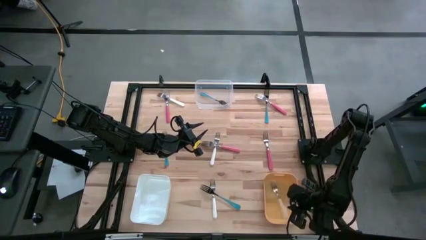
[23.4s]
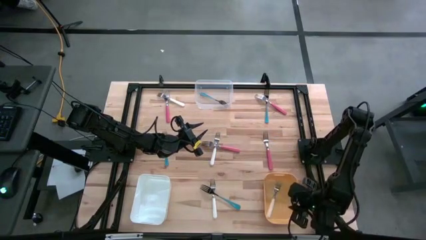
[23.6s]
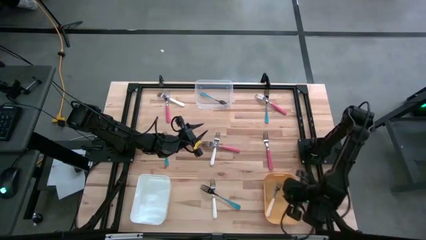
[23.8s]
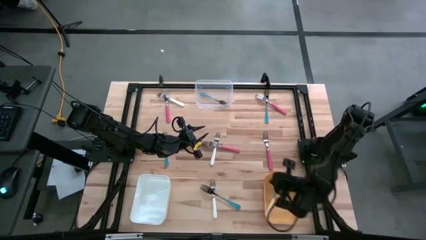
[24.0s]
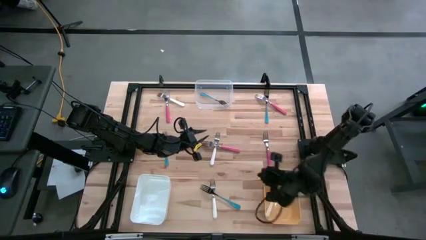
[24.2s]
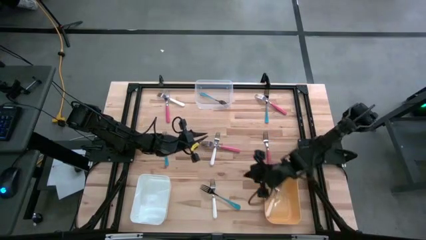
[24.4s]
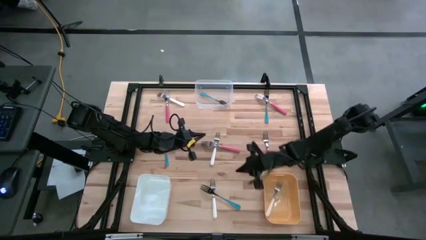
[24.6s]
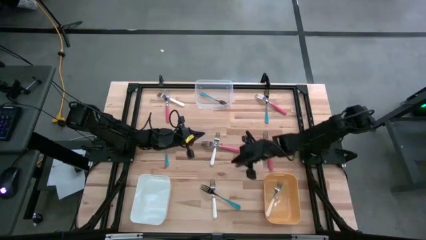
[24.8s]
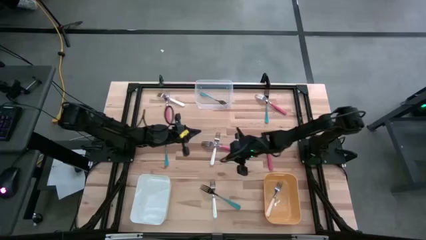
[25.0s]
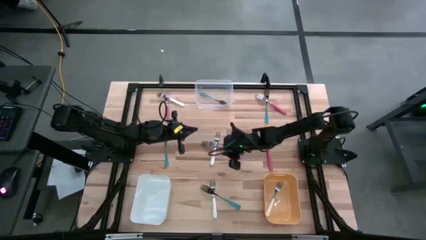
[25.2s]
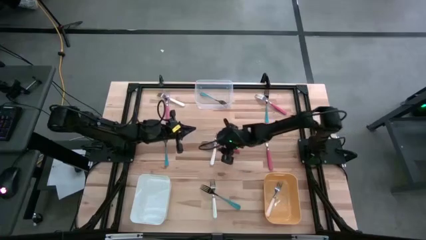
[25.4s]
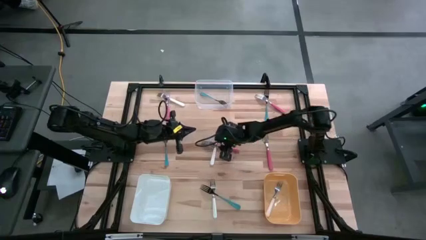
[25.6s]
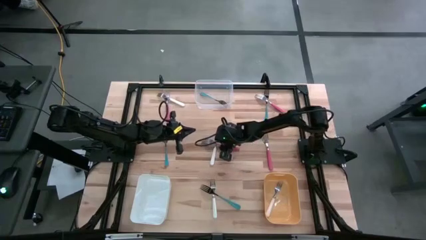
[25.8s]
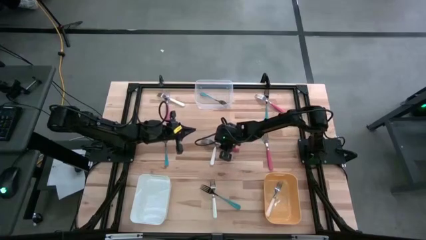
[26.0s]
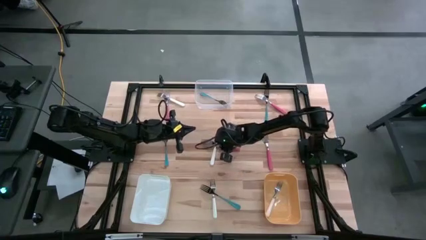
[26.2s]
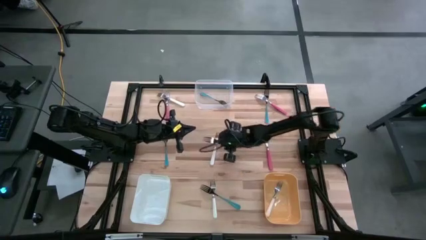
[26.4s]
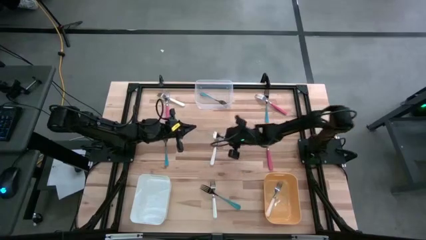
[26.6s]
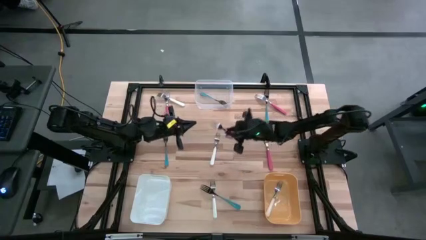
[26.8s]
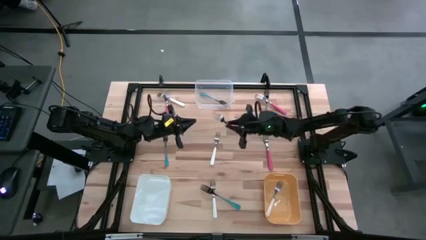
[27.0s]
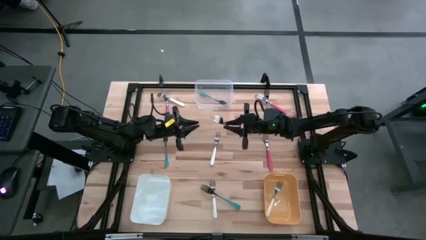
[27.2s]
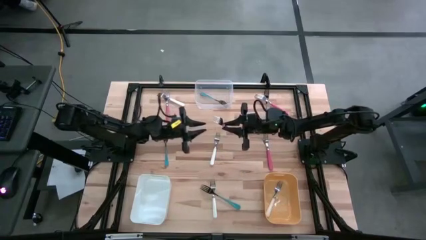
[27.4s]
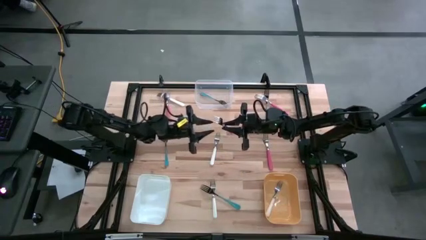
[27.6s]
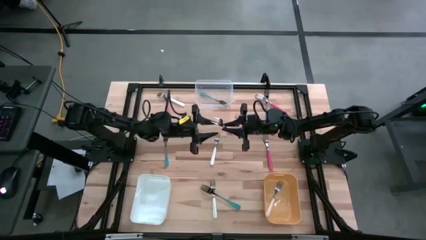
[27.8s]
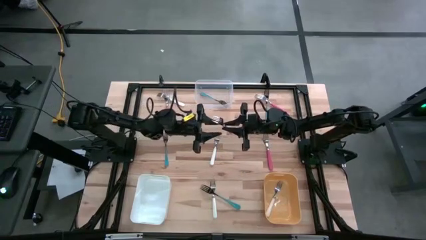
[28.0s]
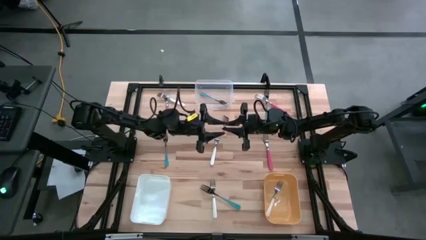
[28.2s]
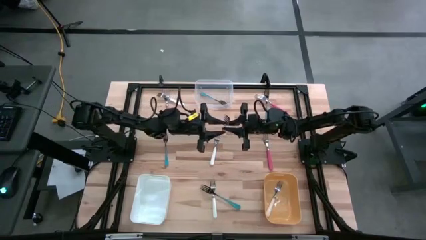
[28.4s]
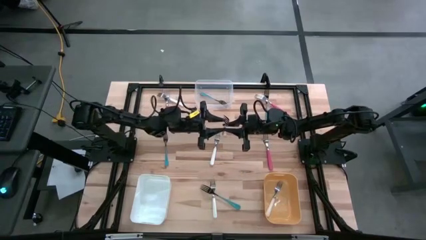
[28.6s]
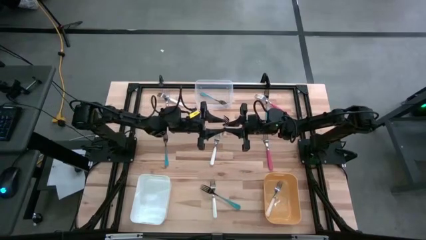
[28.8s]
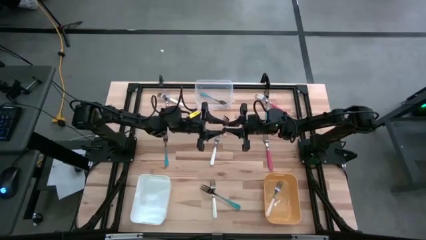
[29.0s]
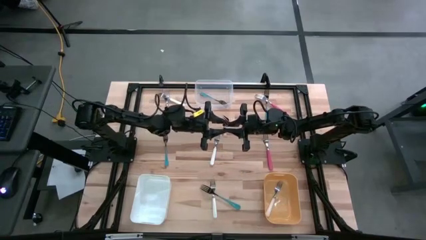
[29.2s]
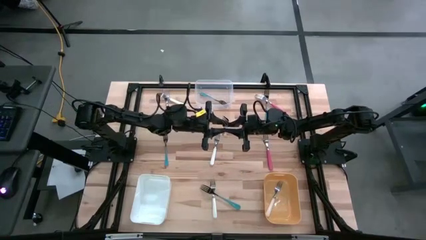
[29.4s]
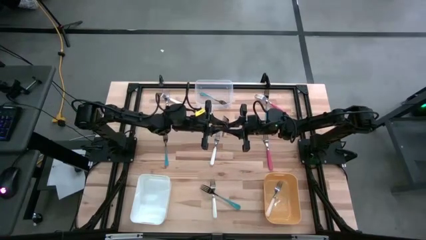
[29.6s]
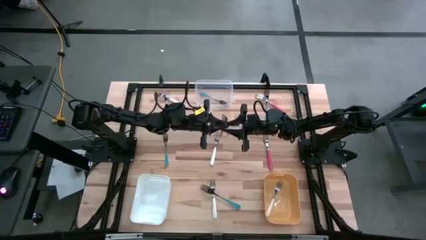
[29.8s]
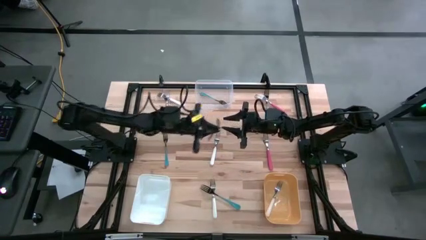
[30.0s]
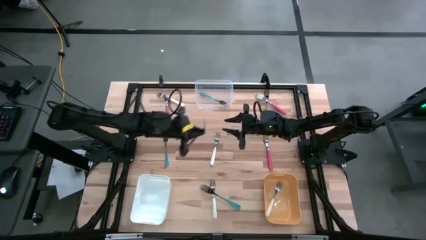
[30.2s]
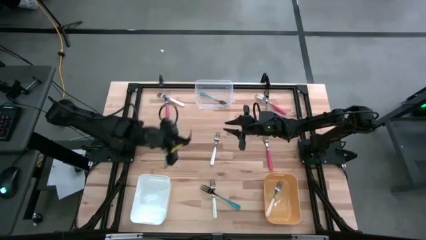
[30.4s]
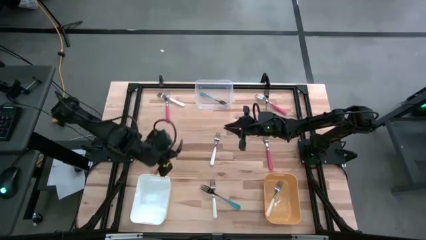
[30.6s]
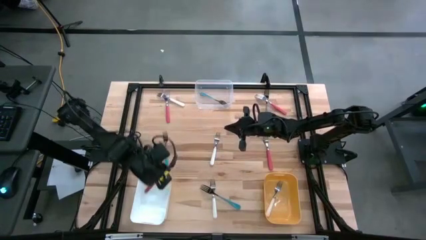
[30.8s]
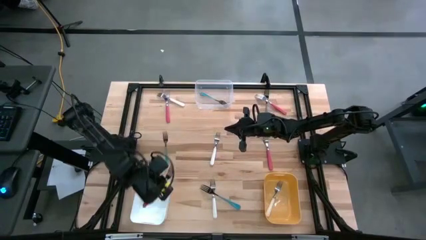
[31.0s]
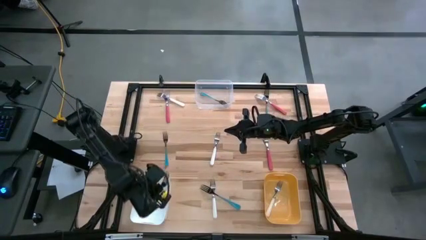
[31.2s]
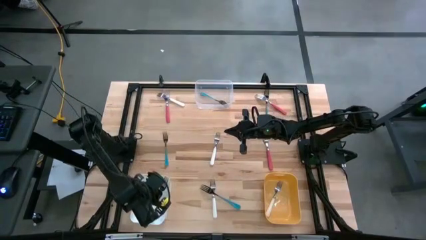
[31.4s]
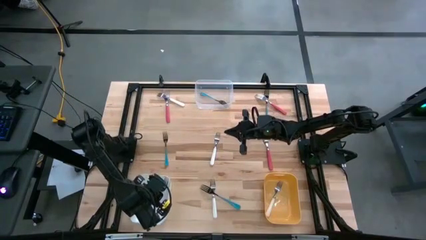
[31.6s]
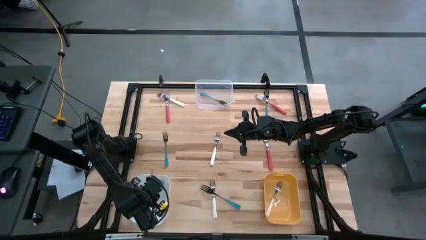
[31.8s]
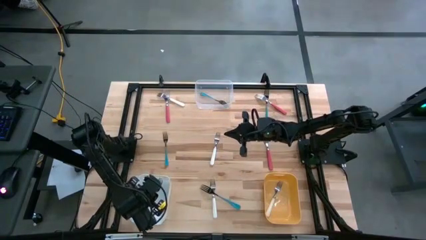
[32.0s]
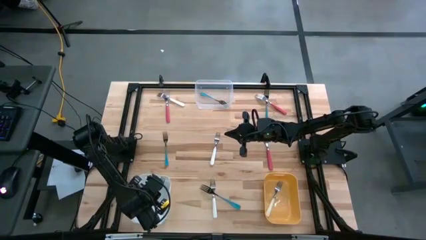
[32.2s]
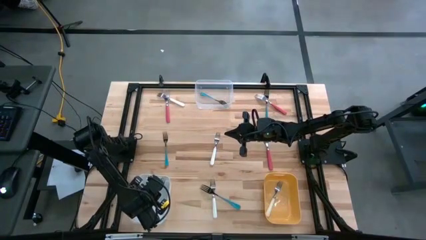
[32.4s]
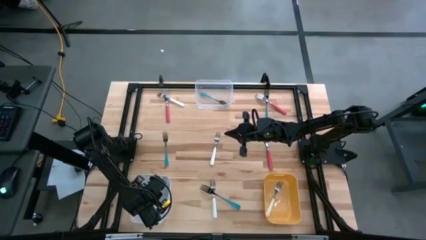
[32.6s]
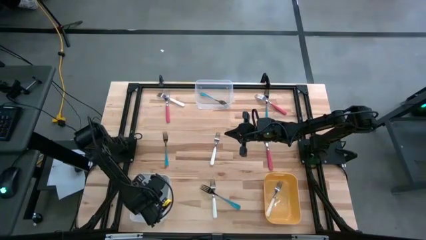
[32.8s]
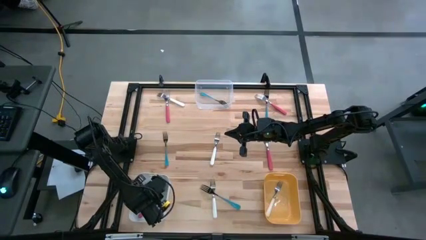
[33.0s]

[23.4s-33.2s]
Task: Sort silverware by color (type)
Put the red fork into the white bin

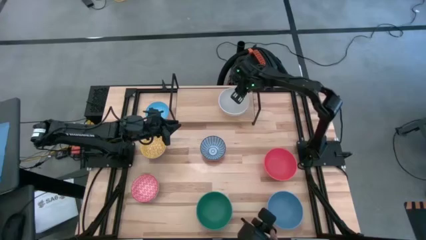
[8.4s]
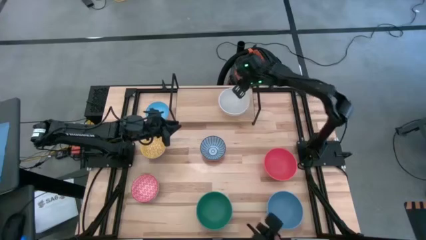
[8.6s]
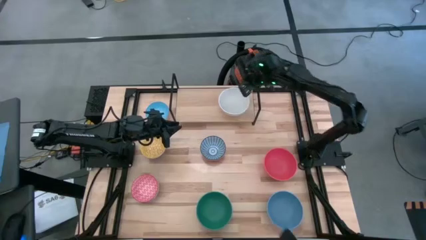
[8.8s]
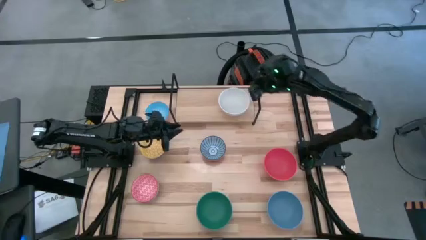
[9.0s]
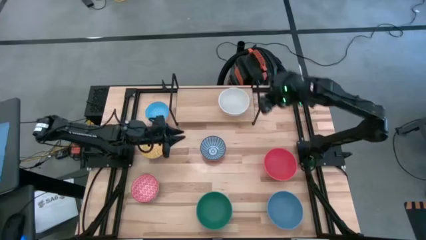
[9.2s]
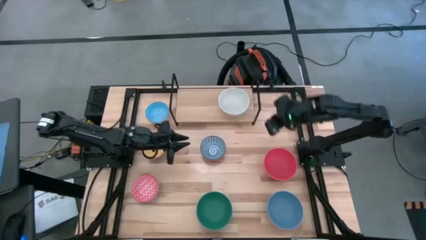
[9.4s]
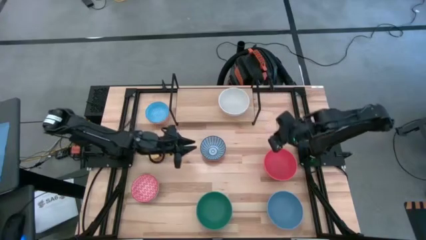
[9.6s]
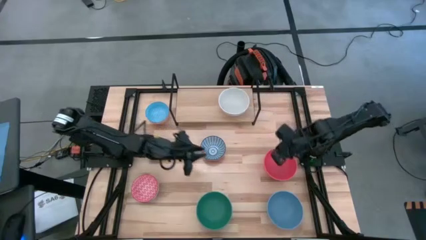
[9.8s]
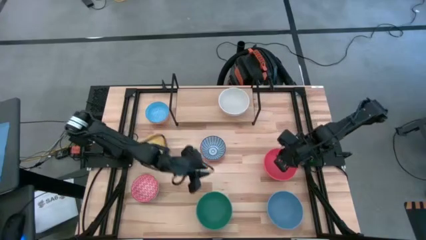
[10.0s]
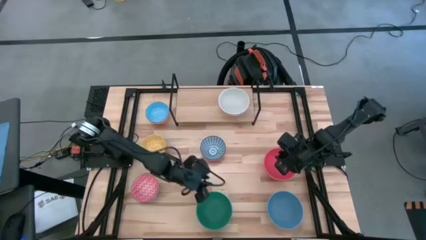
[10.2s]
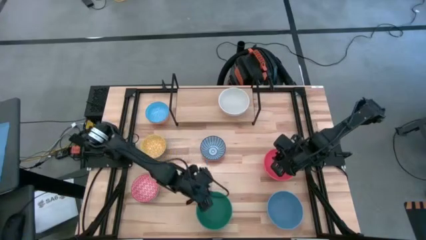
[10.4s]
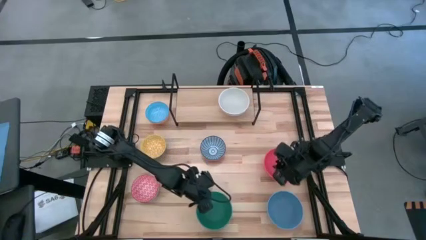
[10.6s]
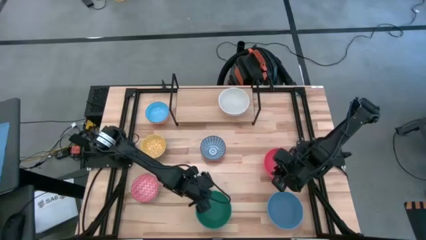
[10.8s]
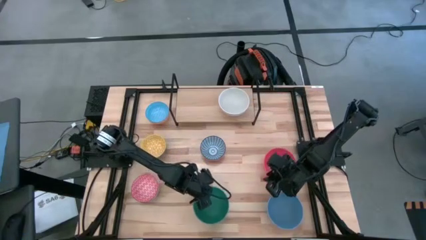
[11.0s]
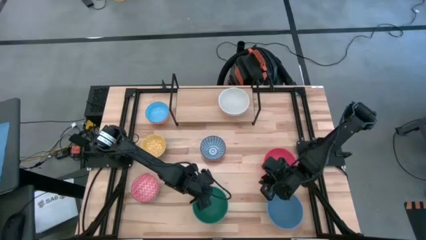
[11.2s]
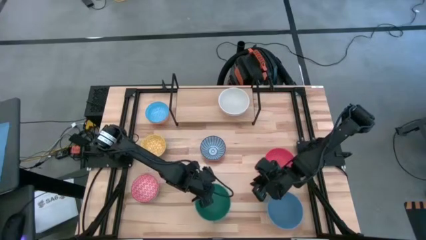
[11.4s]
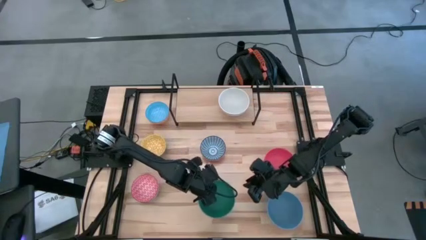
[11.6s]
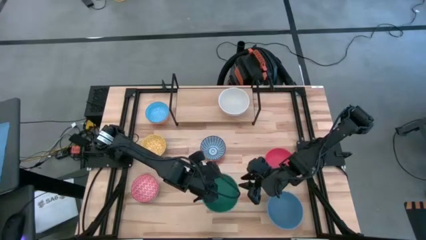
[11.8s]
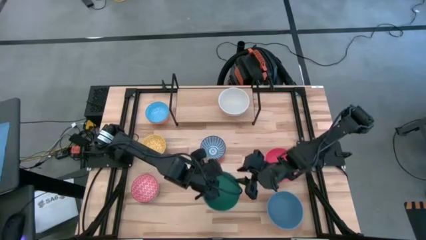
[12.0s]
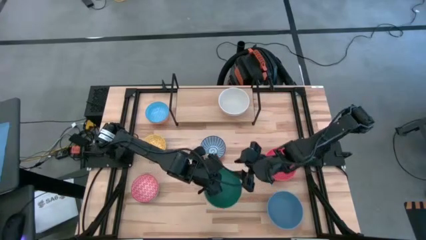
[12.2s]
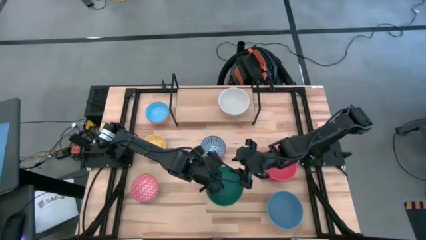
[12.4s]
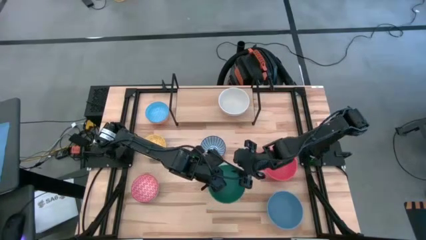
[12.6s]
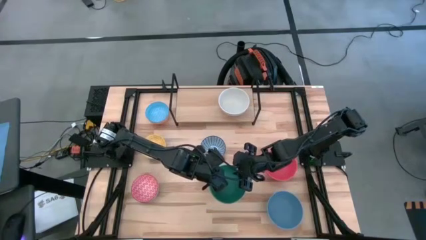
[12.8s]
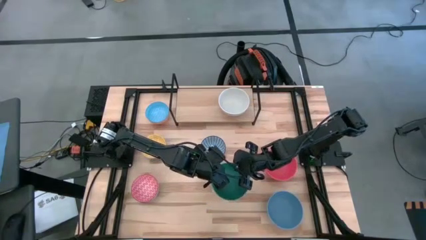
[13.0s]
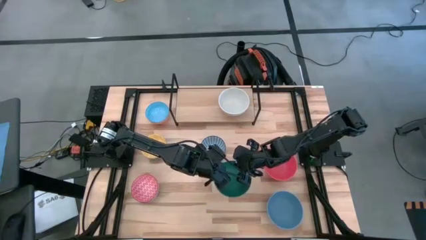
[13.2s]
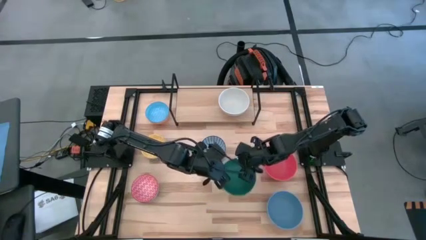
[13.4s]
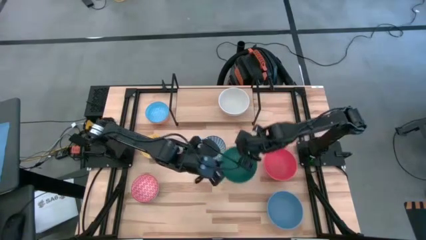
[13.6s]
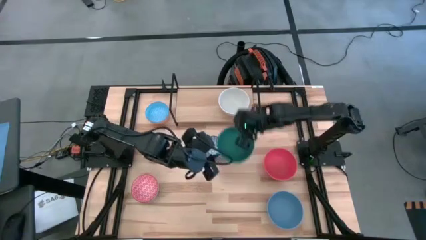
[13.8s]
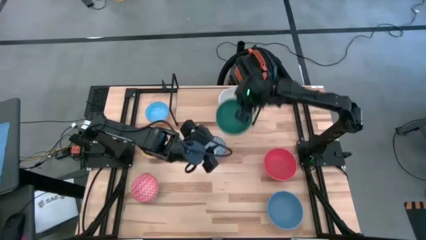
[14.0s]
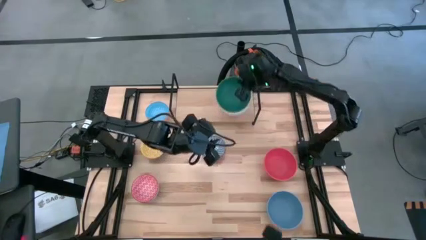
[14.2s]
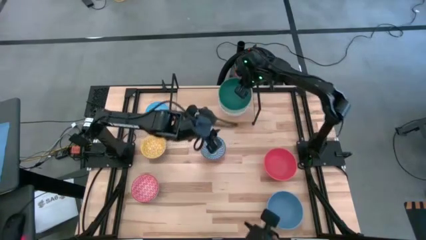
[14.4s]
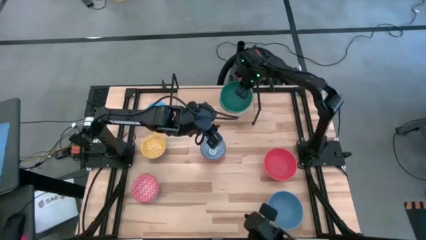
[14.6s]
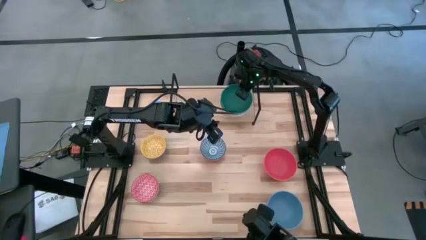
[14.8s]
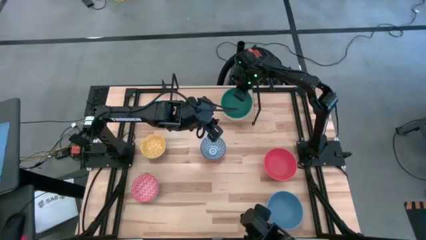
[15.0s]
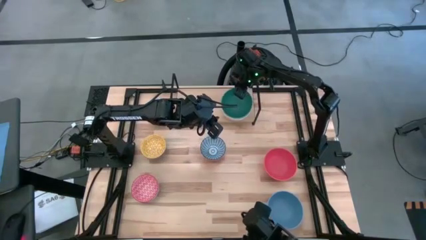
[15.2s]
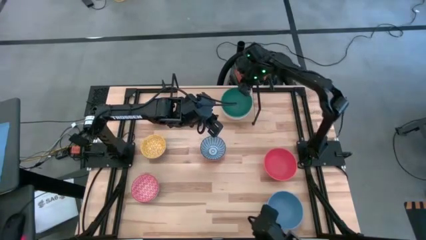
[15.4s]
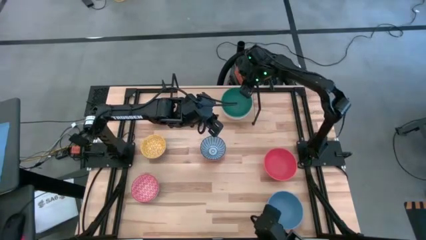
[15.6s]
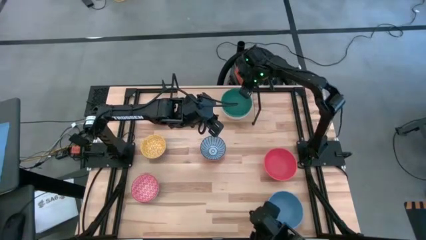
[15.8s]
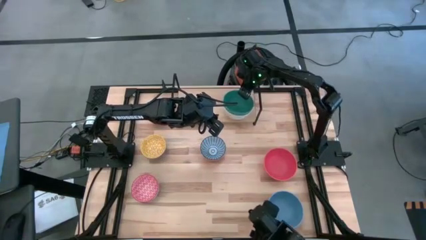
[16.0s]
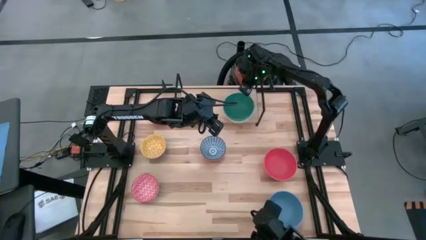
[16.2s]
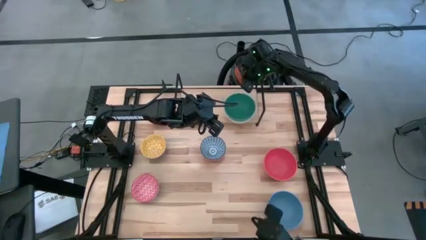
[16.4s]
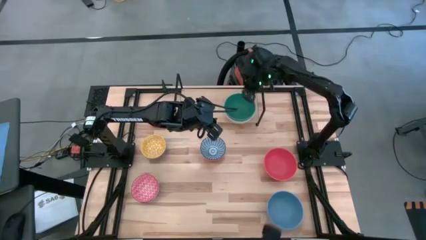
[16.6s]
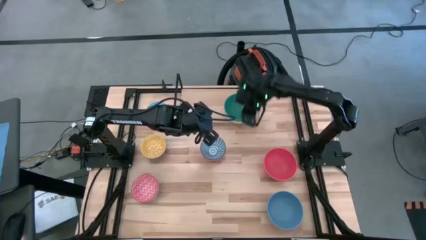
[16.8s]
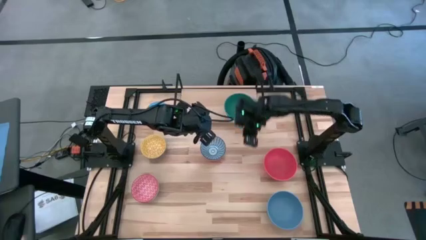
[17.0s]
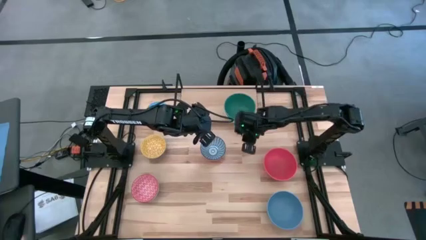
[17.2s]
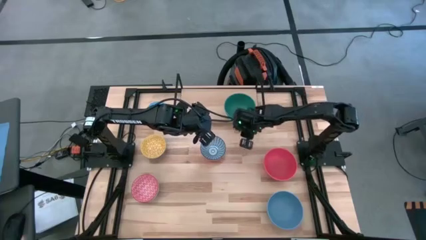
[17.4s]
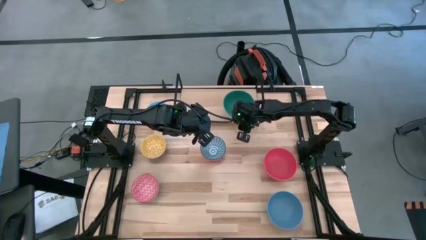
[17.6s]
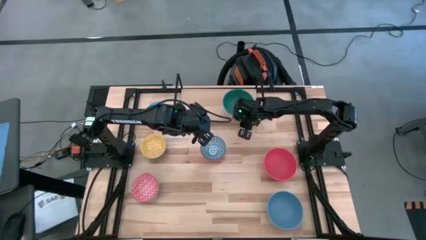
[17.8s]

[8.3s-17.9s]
Task: Place and stack bowls onto a shelf
Stack the big green bowl on the big gray bowl on the shelf
